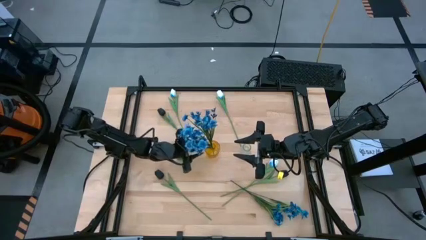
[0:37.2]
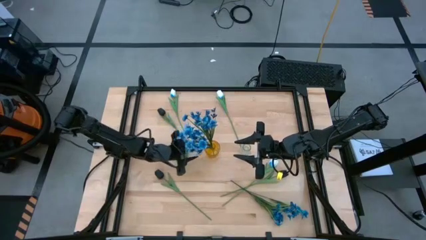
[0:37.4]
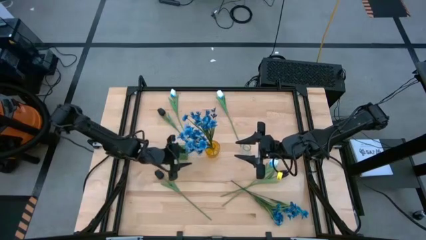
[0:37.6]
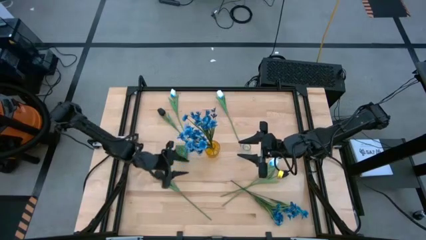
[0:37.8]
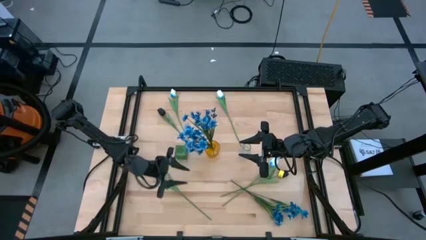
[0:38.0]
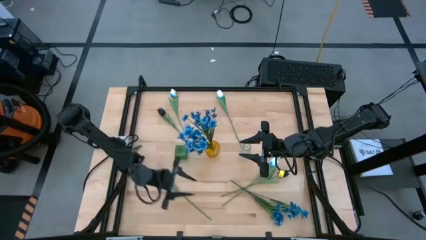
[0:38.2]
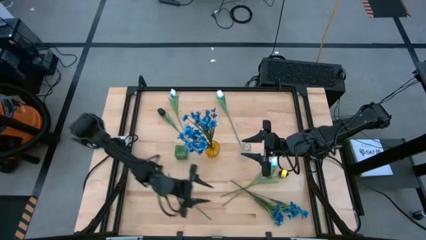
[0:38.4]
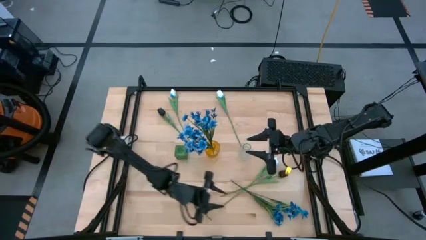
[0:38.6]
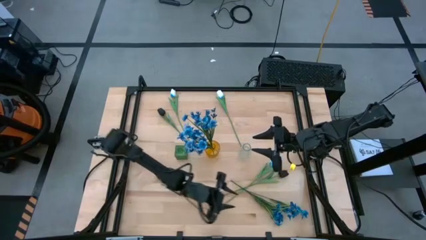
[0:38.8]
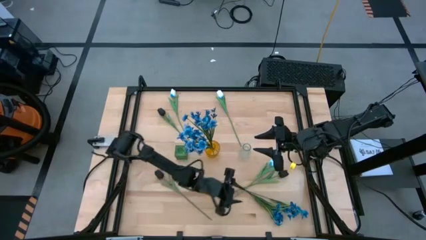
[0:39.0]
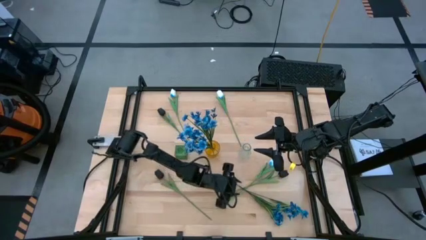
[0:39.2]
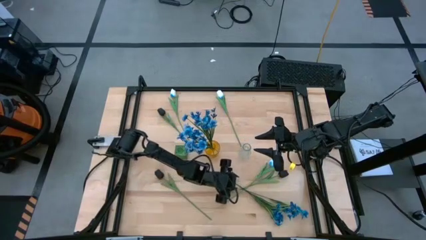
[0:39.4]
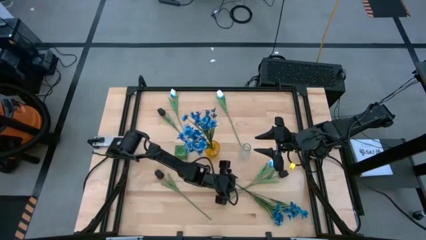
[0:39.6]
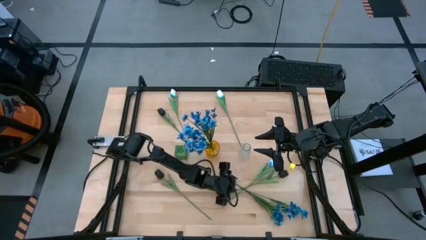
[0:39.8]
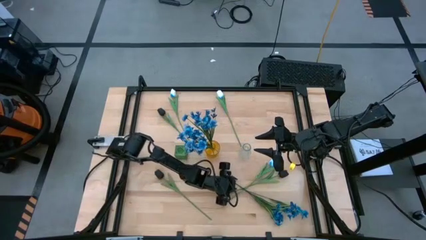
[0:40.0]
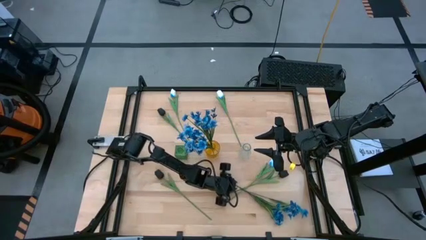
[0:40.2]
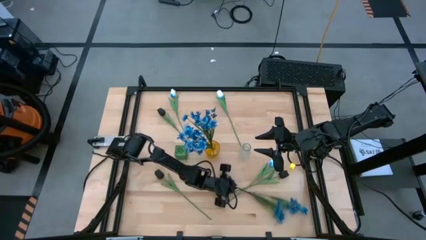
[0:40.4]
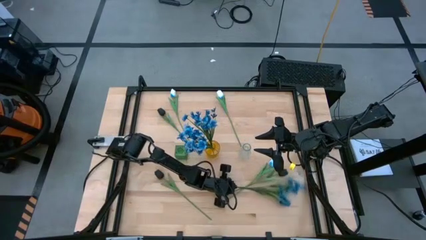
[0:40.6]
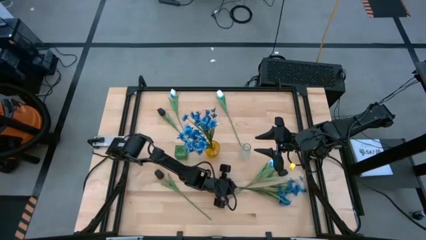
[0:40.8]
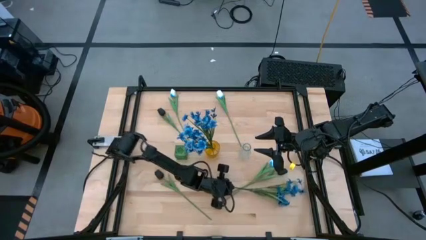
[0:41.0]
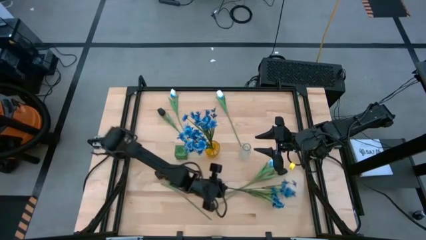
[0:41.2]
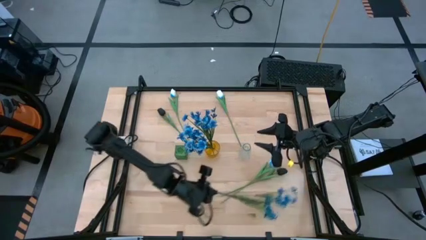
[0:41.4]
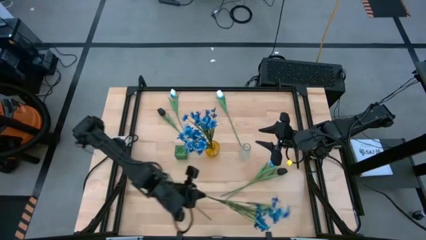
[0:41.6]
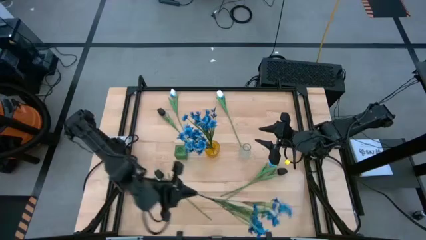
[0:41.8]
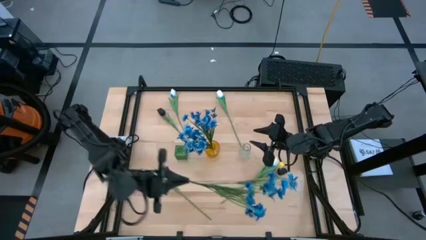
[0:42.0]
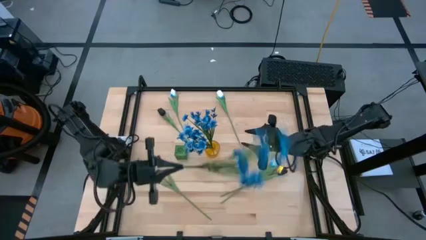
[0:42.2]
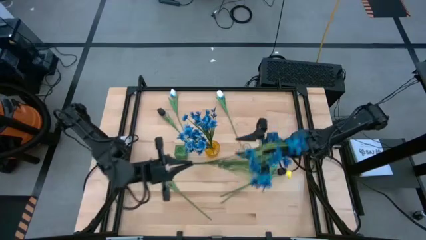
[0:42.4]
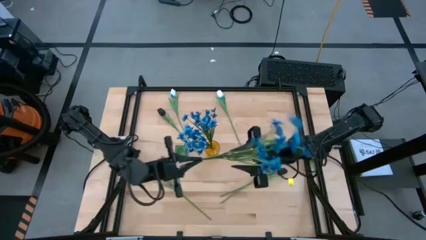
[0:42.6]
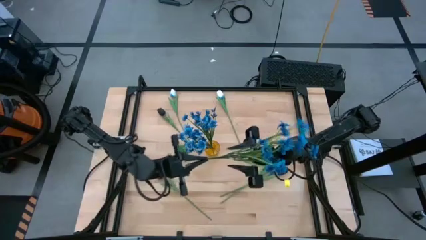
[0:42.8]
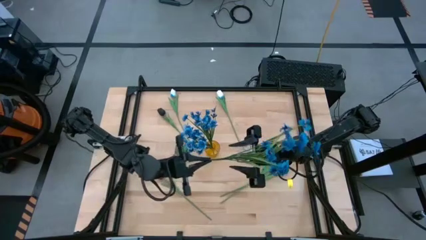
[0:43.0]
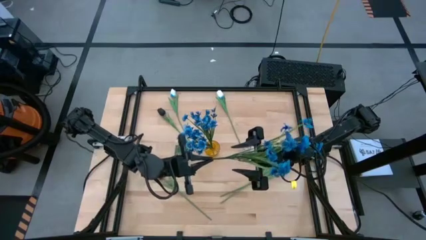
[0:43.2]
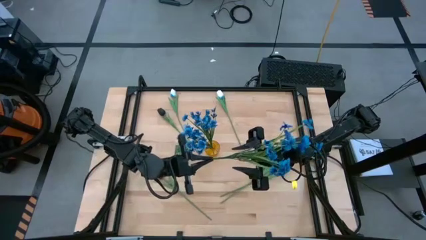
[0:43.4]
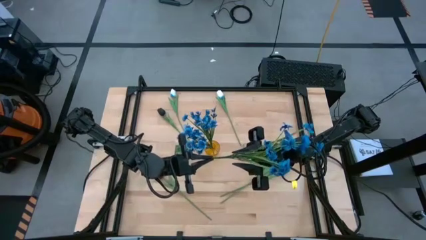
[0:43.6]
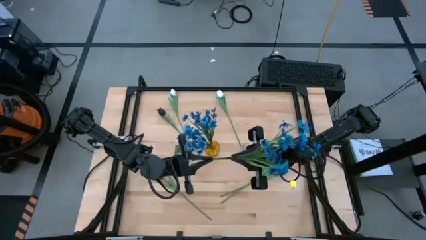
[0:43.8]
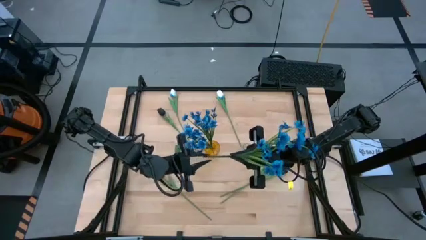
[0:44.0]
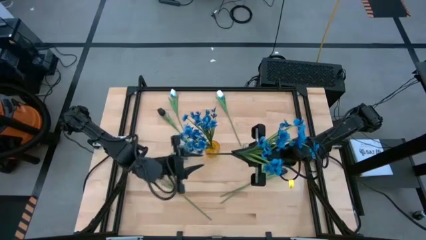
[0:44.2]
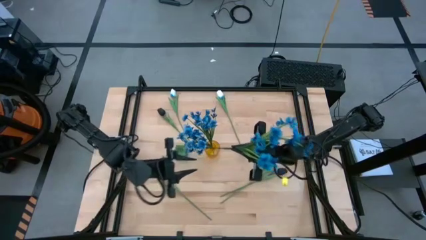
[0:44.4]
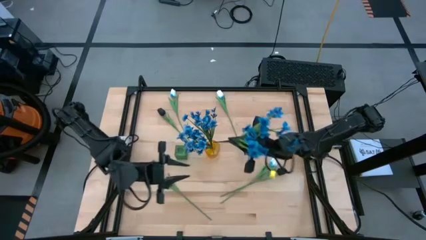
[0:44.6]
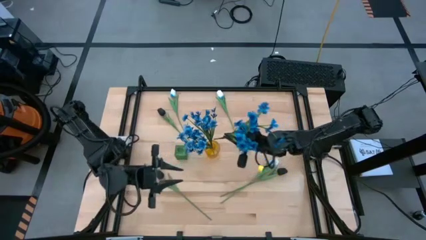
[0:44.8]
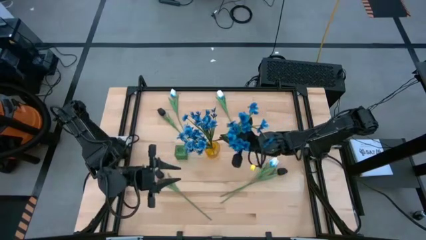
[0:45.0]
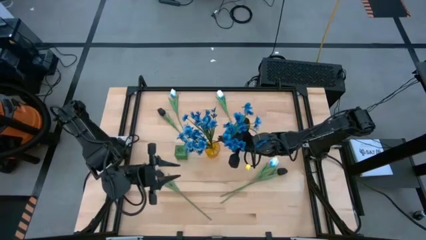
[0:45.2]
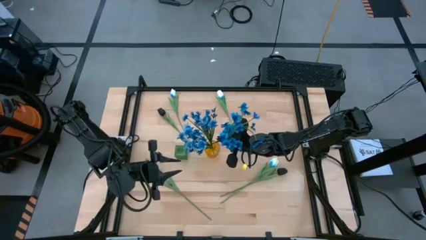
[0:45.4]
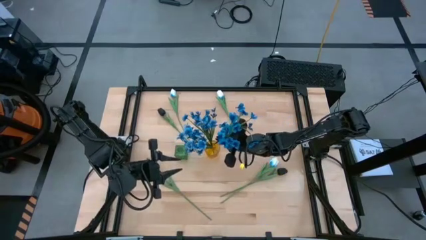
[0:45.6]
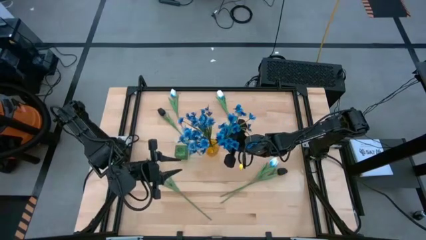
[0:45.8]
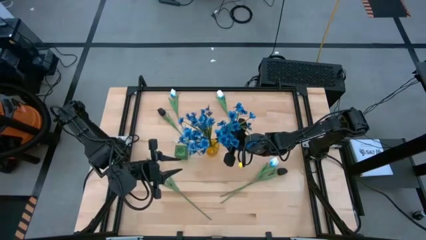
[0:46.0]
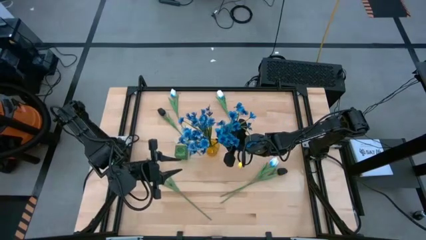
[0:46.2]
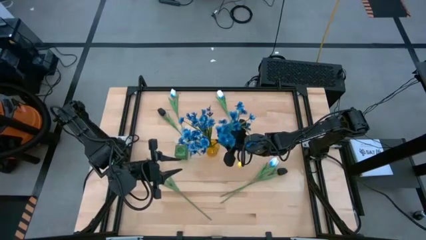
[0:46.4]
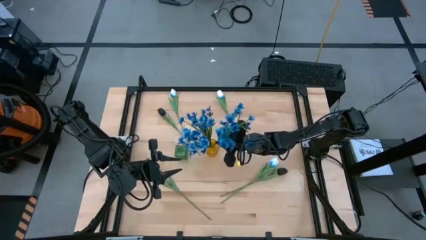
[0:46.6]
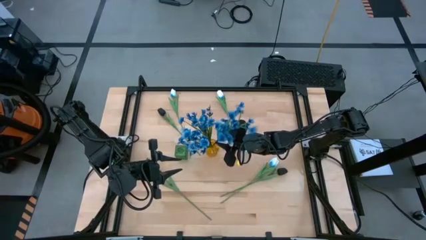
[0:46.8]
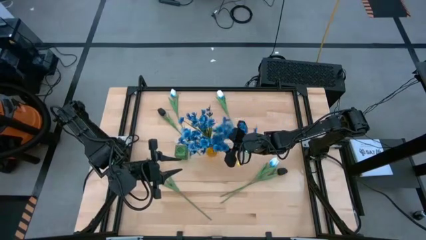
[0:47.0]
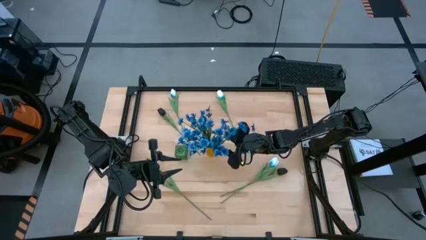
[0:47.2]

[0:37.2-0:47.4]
Task: Sort flowers into vase by color
Put the blue flowers into the yellow vase

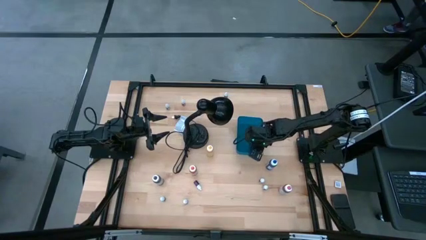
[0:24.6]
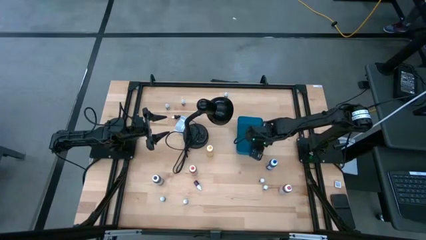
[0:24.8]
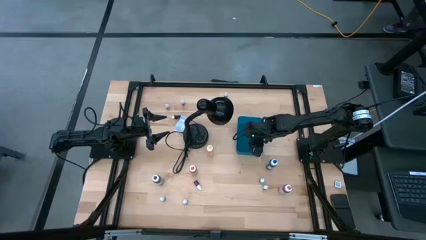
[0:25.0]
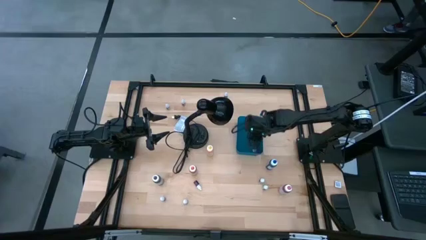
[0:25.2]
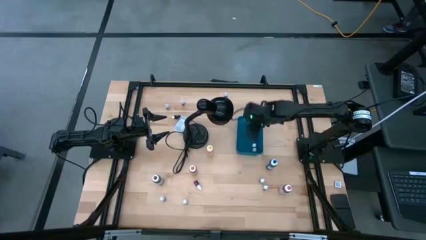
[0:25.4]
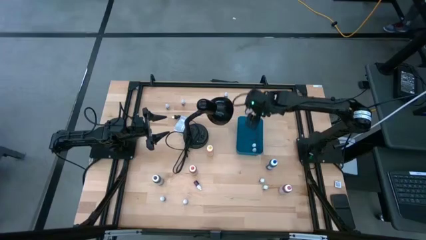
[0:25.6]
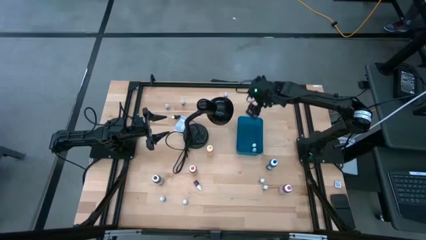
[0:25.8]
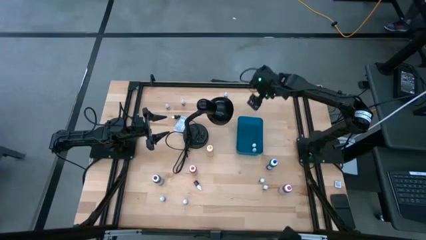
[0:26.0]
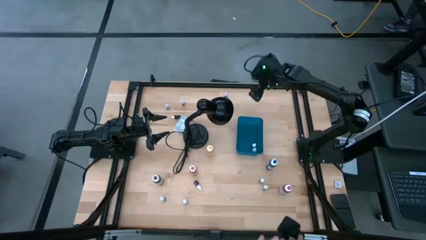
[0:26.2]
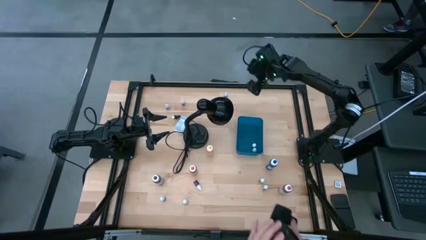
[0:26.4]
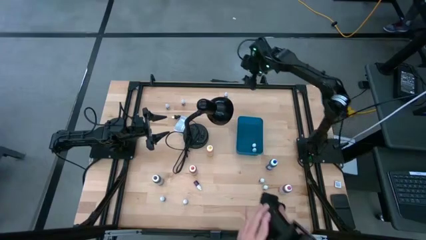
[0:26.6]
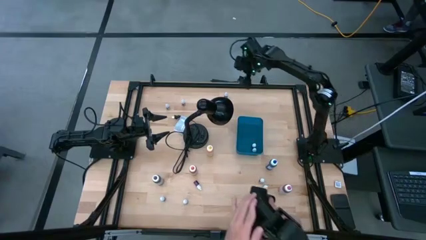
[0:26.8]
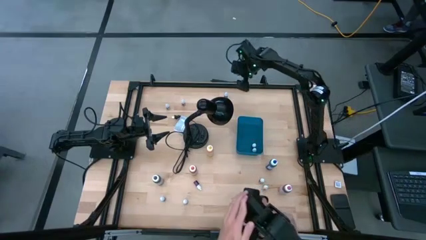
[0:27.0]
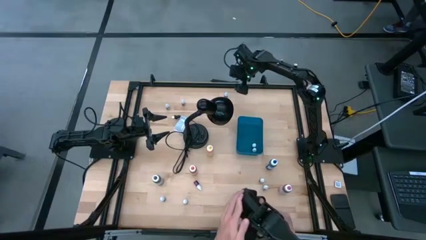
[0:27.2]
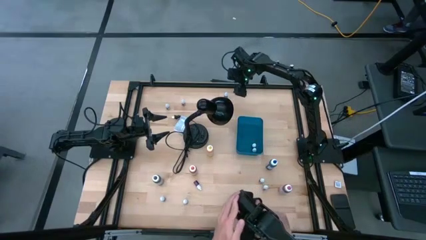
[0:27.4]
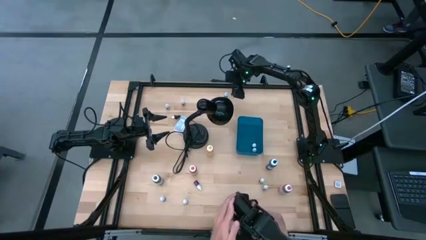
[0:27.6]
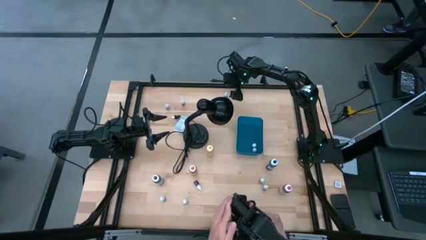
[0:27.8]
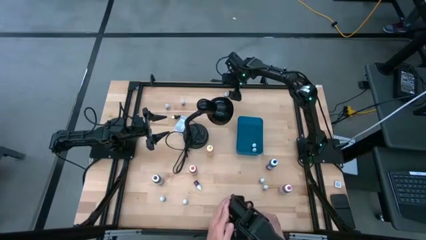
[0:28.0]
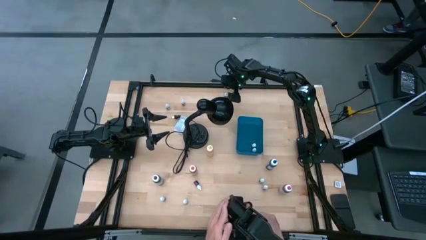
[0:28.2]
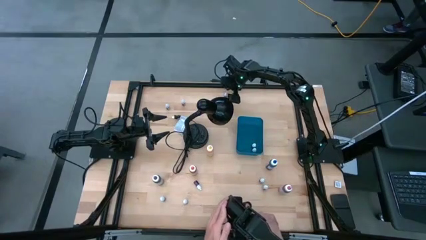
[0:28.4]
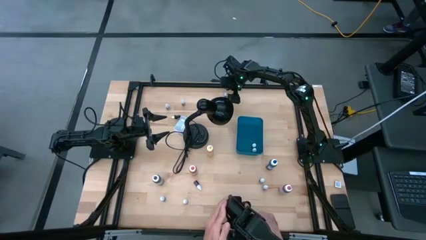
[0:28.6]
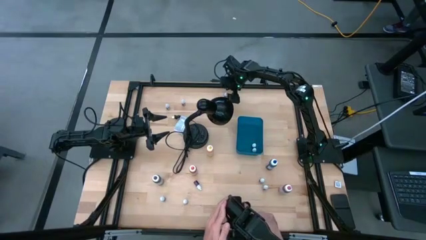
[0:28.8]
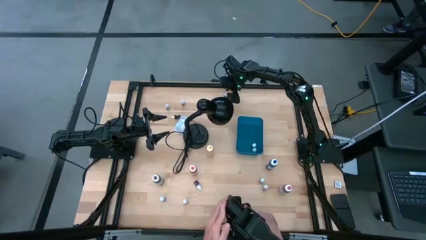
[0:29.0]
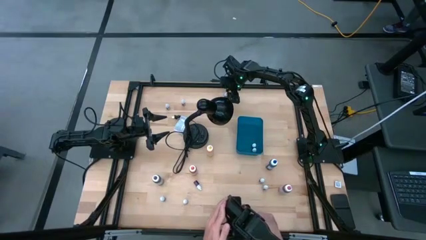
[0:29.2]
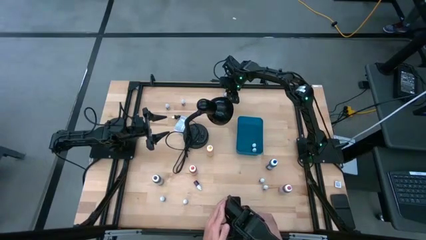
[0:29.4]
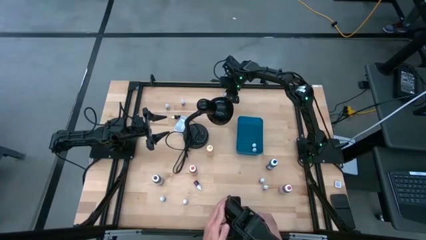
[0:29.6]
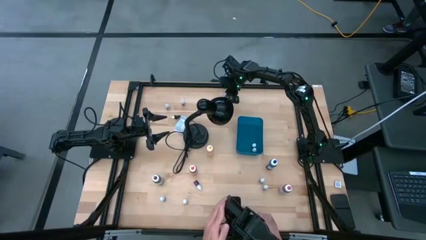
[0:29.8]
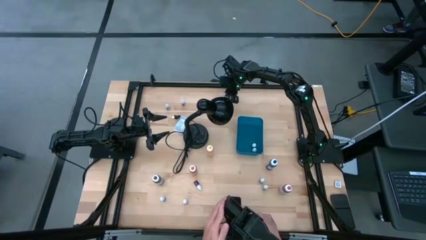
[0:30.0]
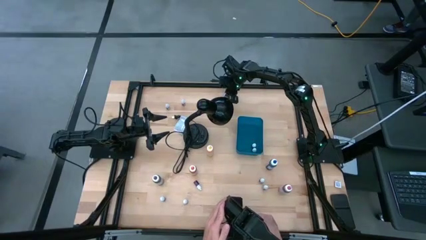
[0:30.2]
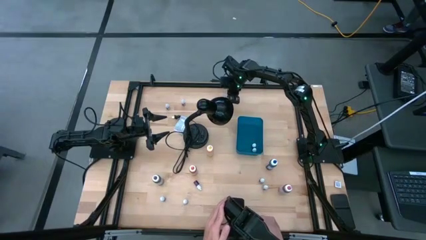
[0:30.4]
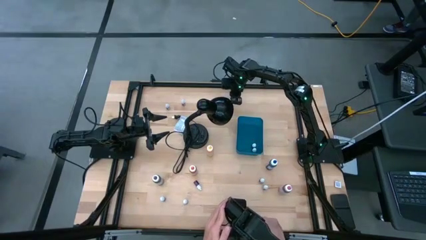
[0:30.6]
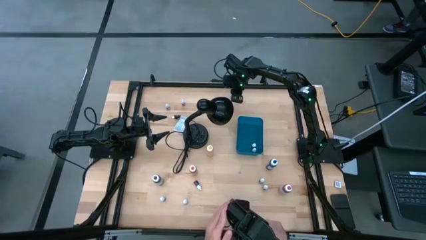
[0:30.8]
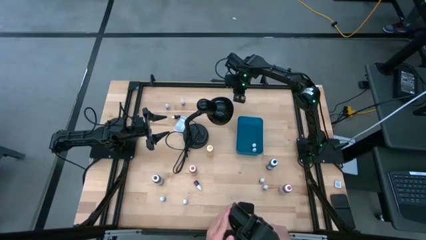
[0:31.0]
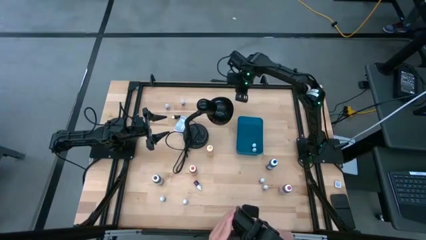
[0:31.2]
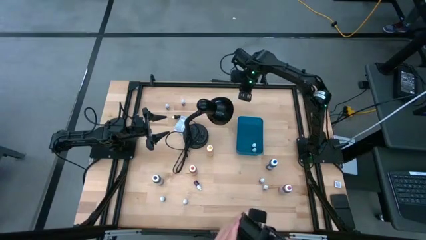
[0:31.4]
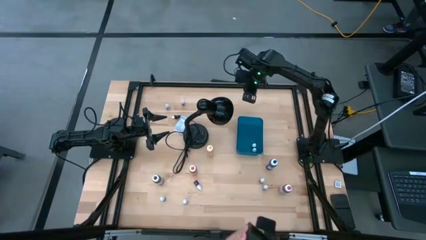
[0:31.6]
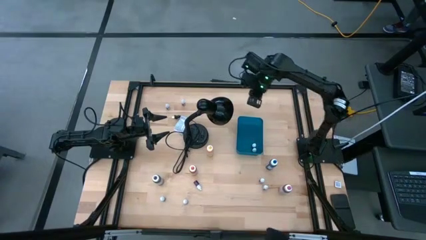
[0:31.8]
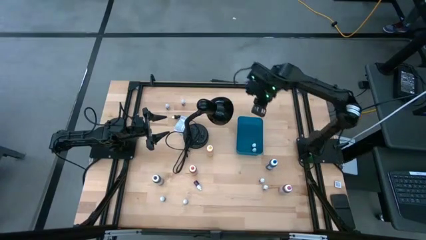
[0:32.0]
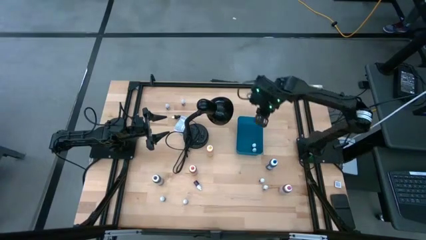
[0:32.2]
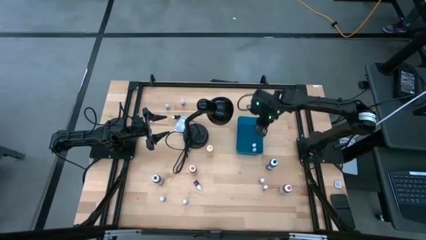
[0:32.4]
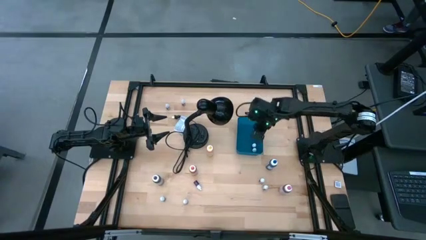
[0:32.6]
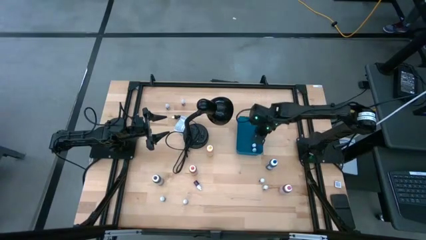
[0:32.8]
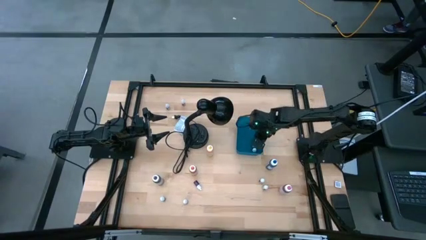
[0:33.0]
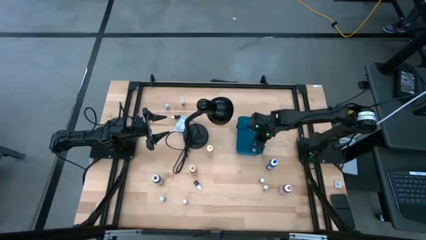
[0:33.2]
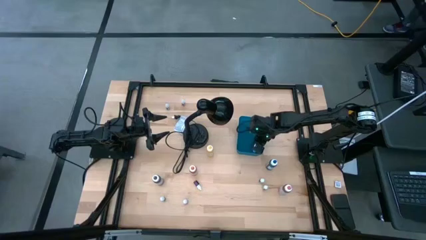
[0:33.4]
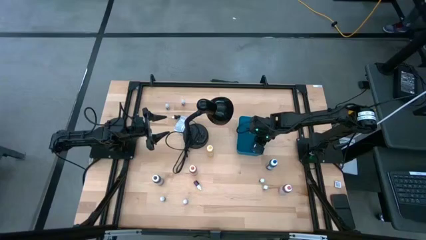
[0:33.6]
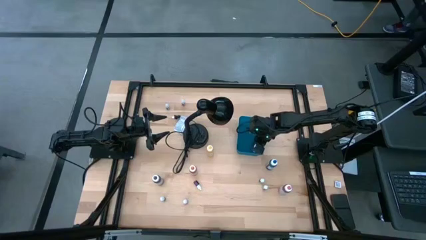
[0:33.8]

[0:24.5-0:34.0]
Task: Pick & Place food coloring
Put the small green food coloring bottle into the blue bin
